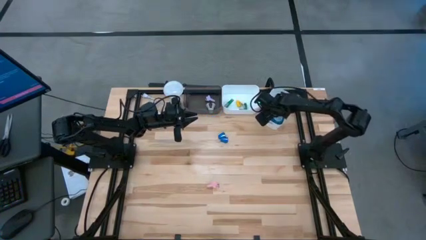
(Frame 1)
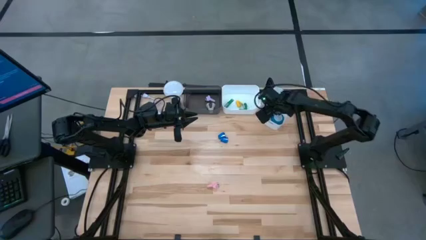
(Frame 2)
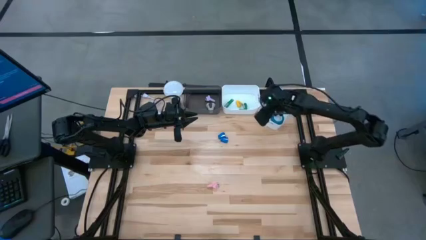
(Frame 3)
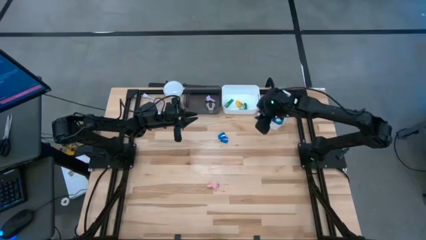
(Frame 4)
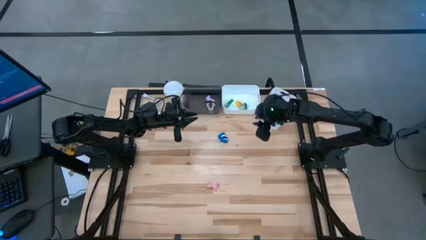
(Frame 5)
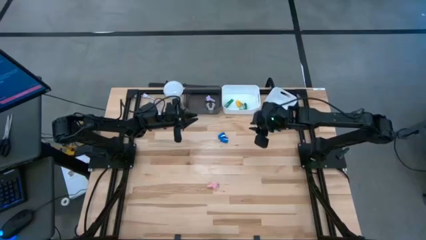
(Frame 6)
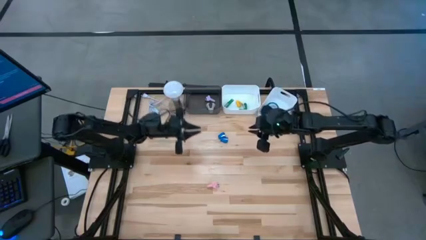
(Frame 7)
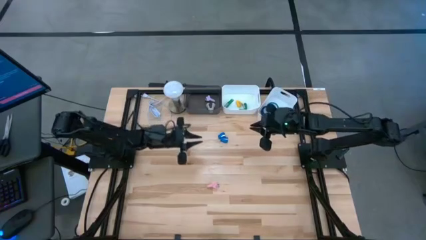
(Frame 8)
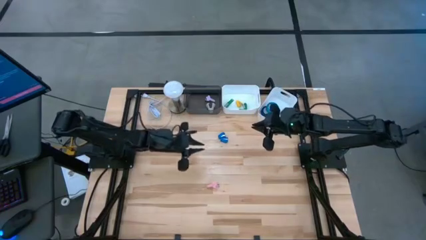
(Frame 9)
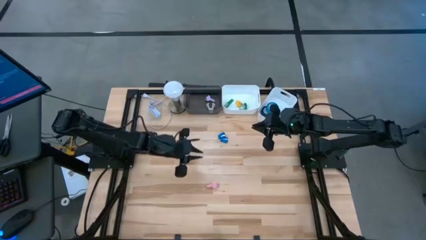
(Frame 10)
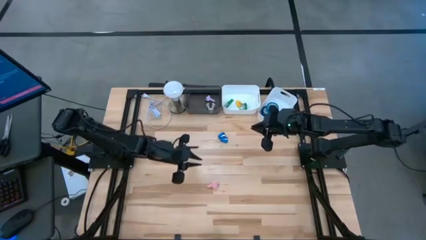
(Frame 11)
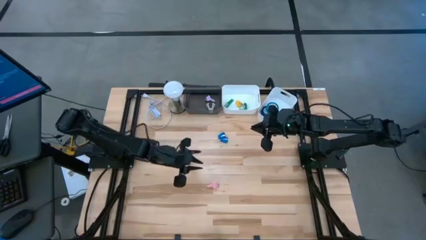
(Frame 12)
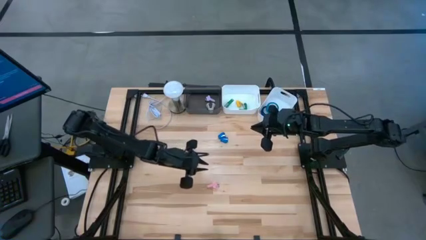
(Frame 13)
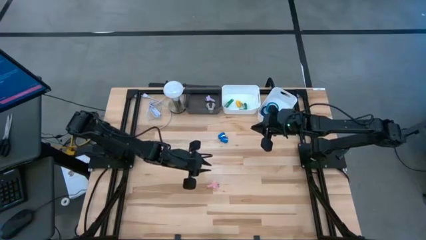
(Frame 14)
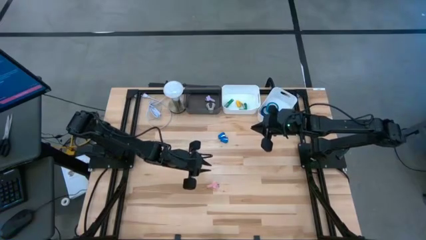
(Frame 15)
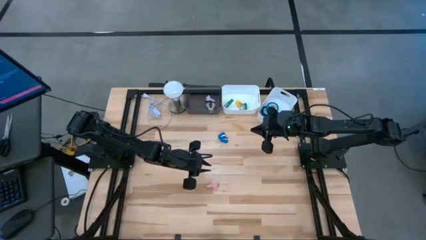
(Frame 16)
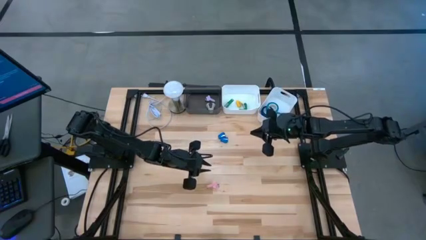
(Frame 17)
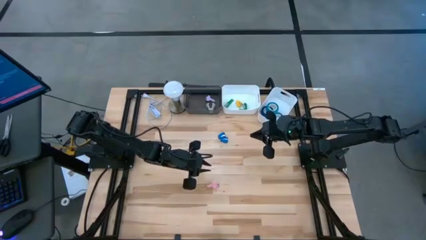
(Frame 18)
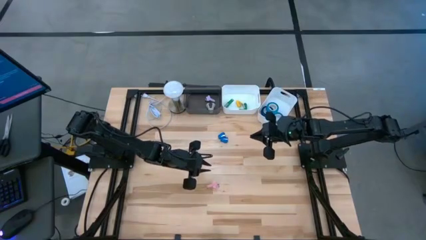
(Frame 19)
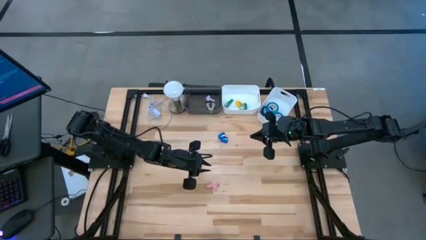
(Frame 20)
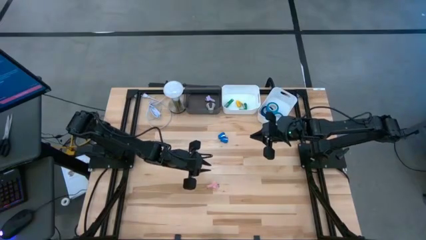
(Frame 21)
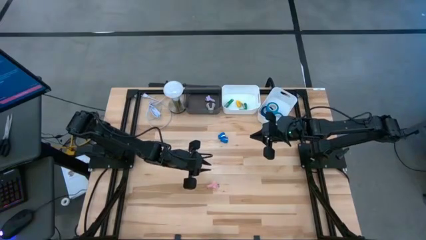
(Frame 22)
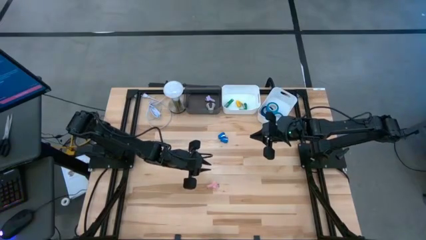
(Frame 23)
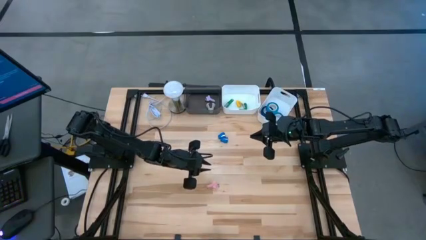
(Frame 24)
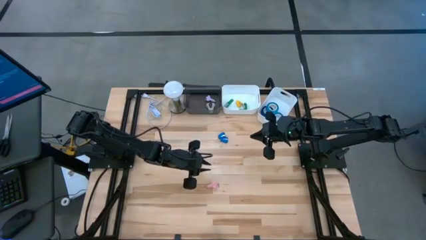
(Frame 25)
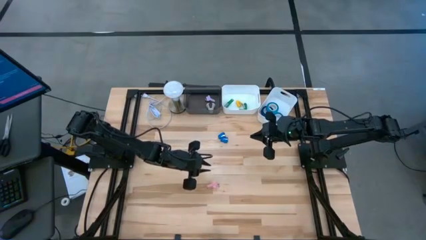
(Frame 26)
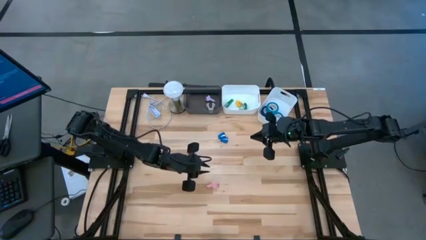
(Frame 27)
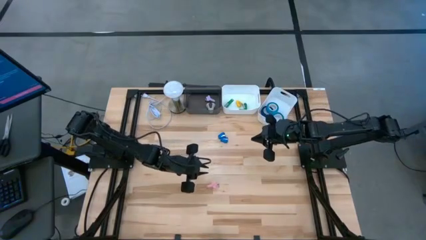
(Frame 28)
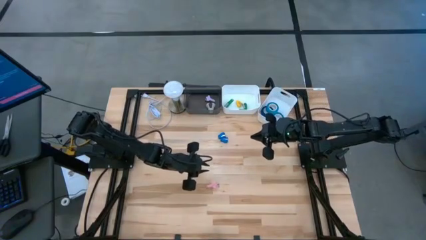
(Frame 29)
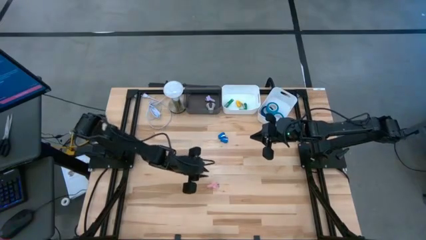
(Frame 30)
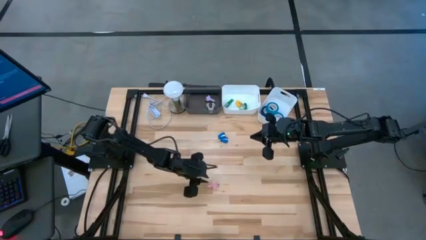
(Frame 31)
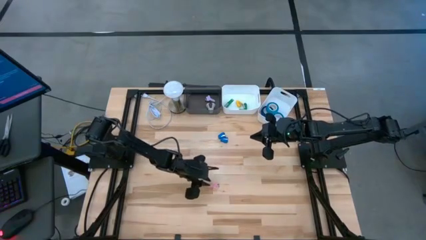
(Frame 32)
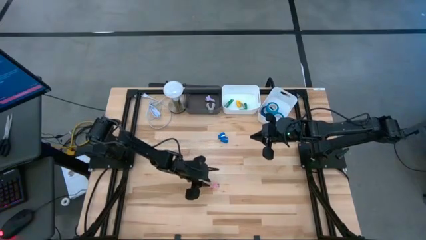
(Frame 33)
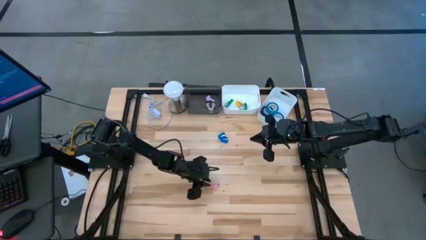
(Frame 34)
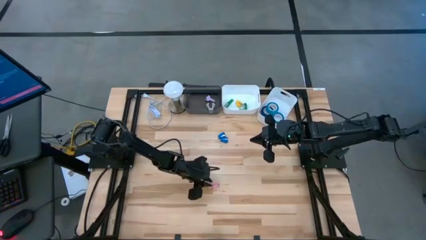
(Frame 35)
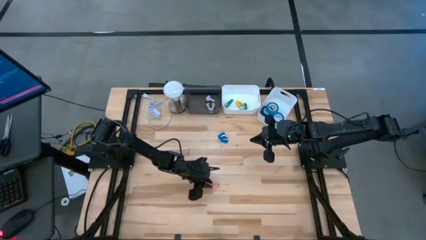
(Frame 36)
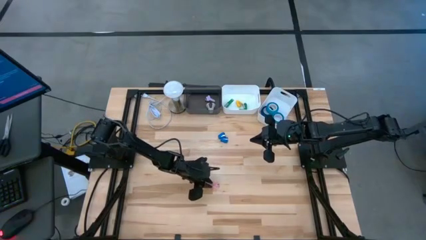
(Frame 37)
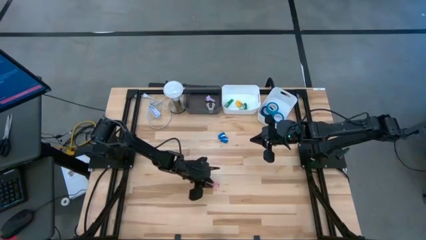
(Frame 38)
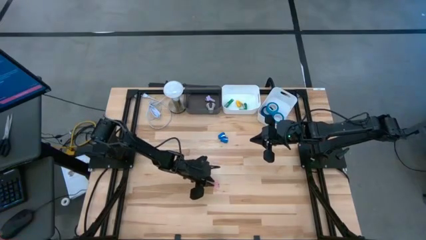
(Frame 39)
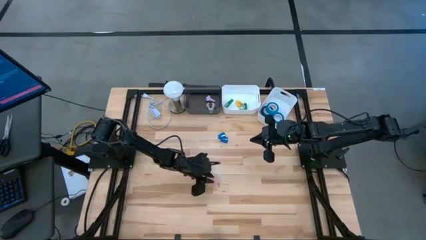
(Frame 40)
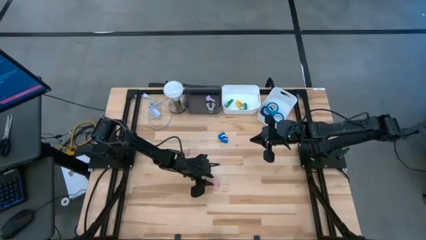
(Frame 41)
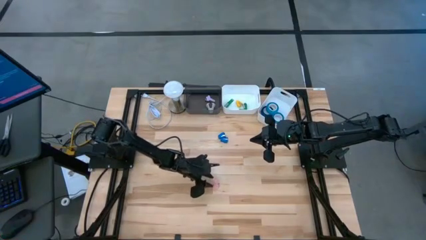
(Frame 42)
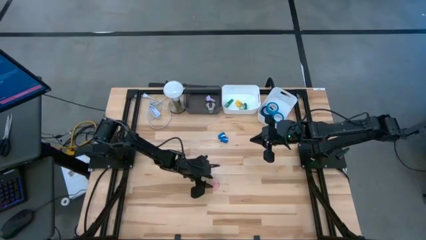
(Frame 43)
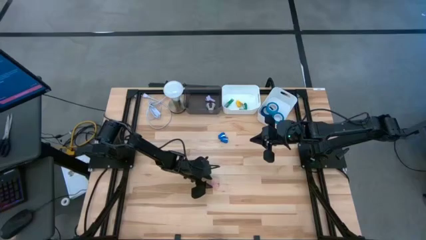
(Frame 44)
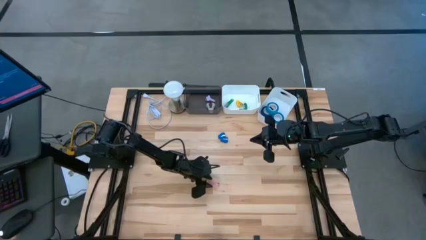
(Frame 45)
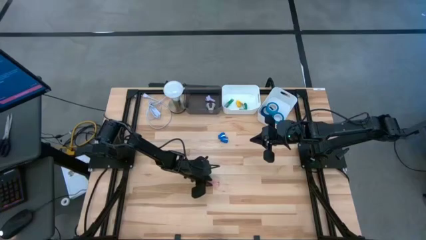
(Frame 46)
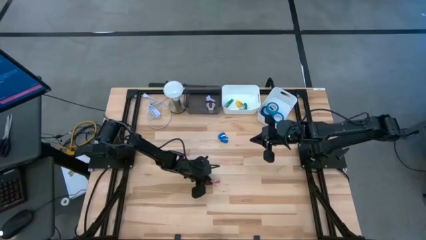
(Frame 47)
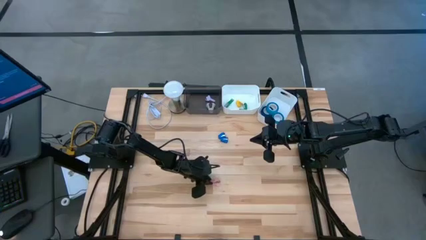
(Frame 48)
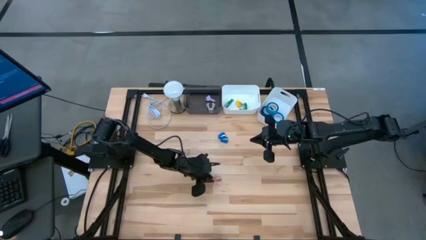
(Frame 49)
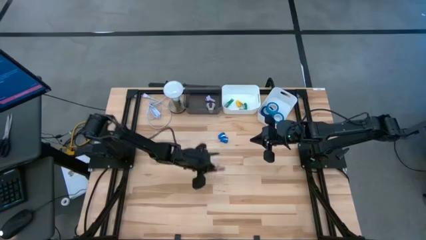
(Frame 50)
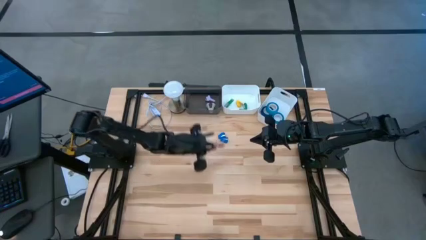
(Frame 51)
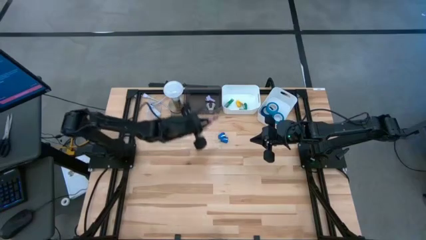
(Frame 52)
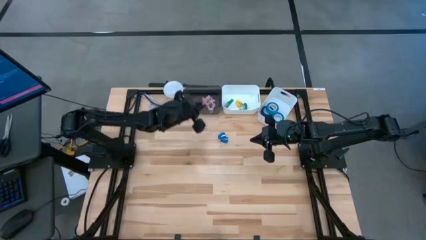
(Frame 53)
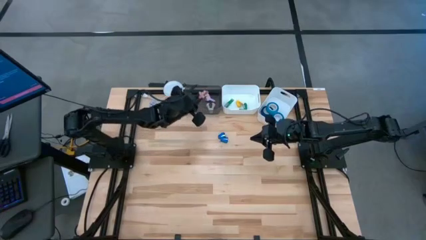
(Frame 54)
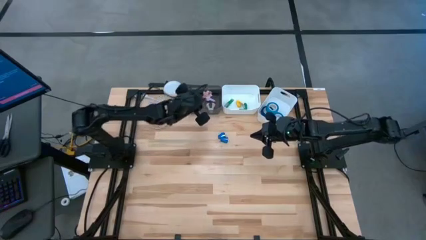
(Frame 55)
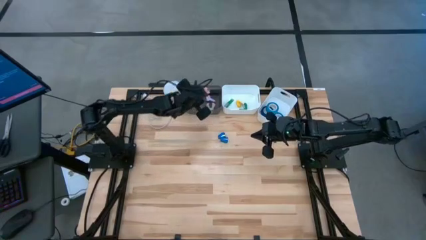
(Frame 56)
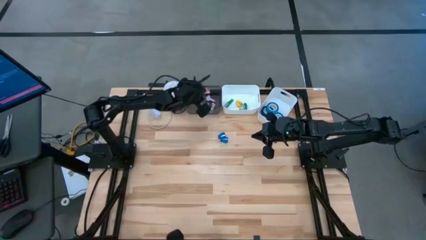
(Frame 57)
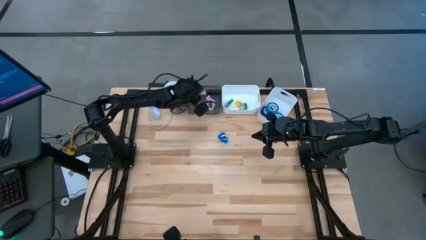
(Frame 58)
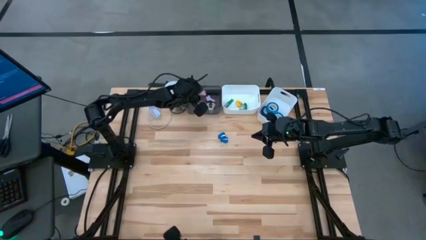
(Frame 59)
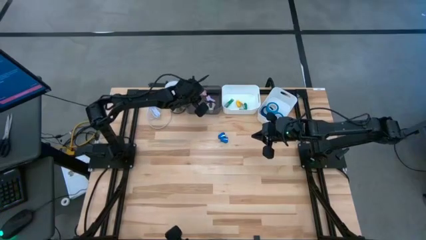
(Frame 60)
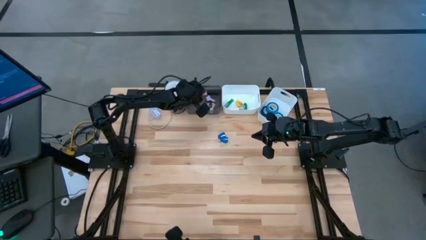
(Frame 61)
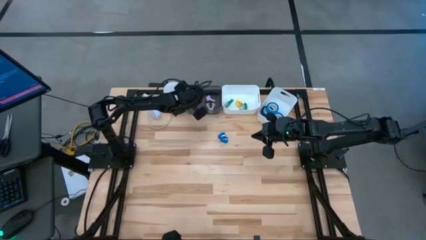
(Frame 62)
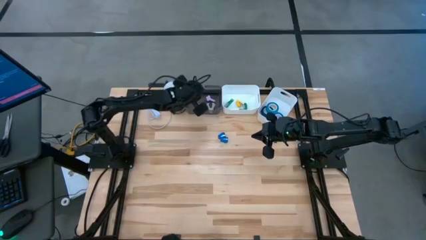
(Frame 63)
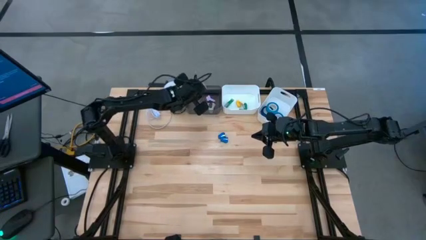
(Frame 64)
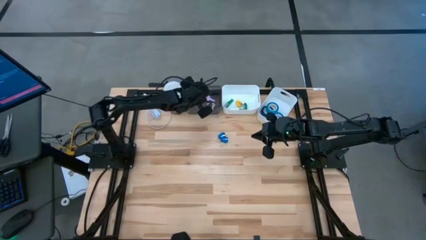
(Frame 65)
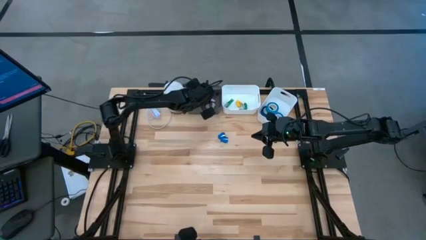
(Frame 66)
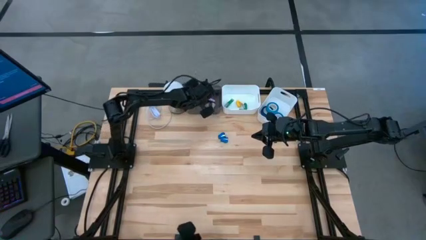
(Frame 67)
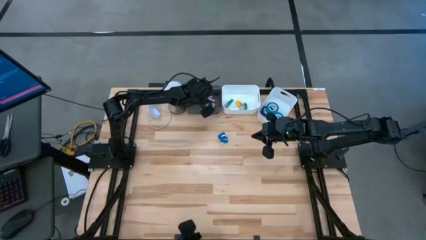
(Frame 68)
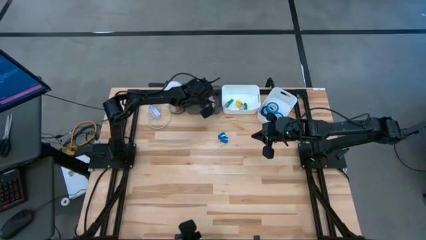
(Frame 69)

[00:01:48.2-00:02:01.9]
Task: Pick and place Stapler, Stapler remover, tape
Put the pink staple remover into the black bin

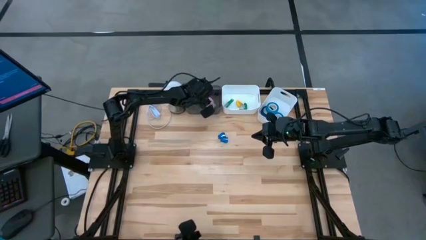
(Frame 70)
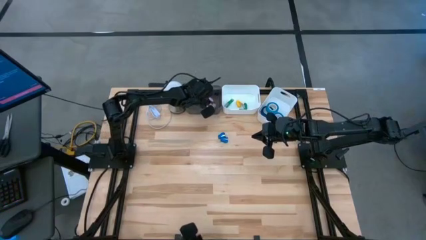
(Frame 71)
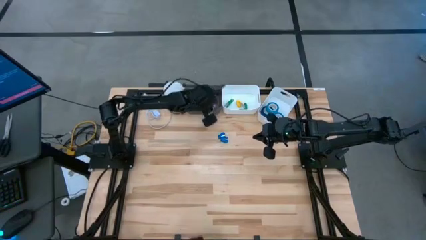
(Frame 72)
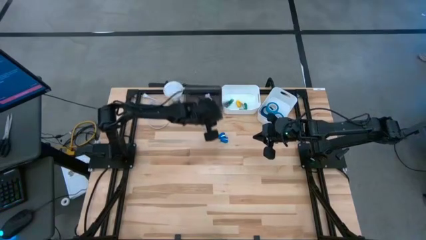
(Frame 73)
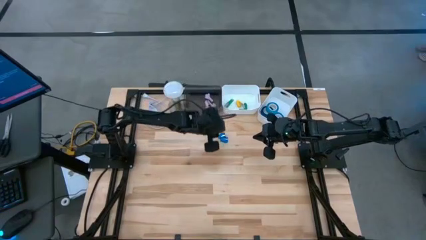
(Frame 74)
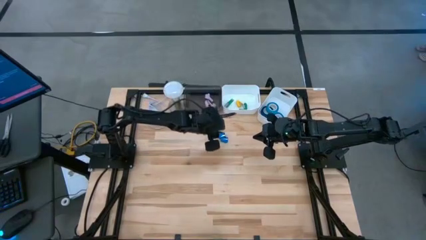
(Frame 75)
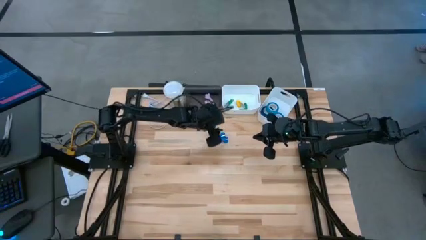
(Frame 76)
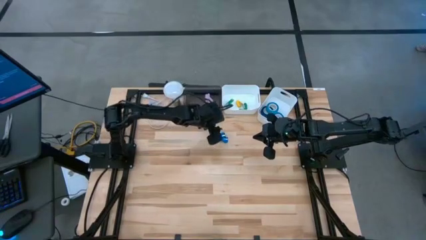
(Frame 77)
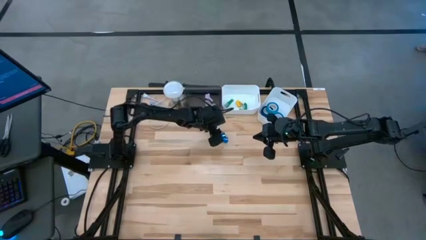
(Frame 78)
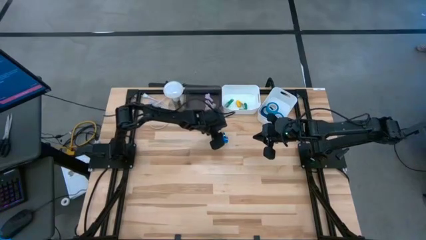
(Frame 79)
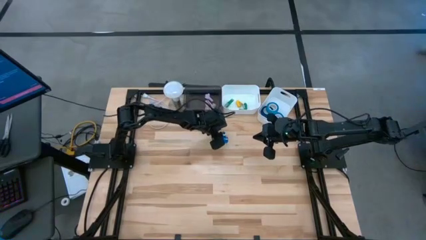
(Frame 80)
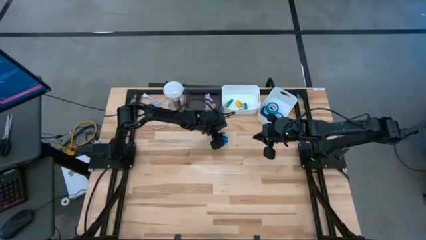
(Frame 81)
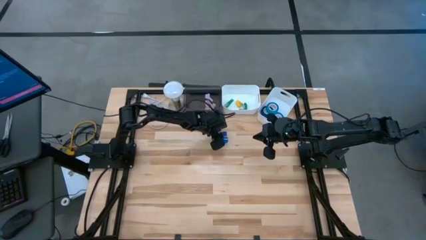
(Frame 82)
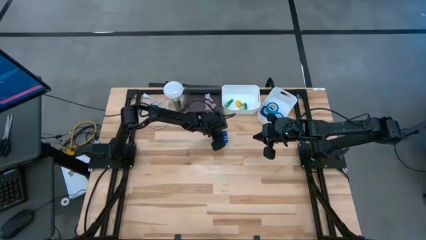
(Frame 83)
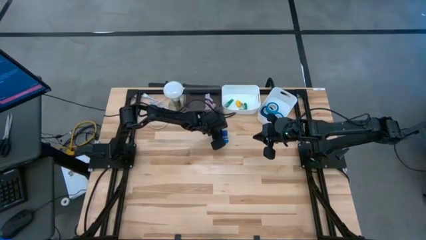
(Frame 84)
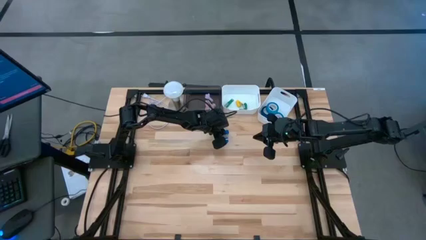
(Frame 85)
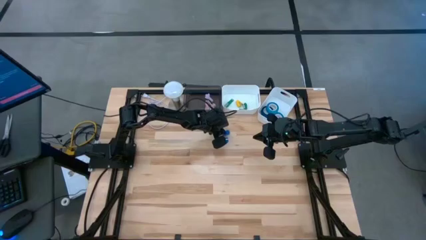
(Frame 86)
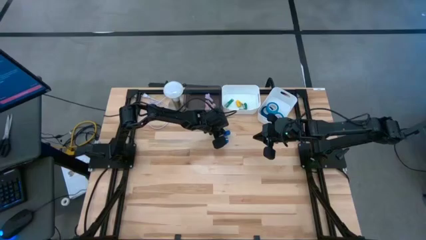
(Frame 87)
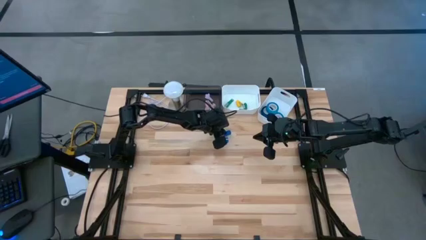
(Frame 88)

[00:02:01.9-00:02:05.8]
Put the top blue stapler into the left white bin
